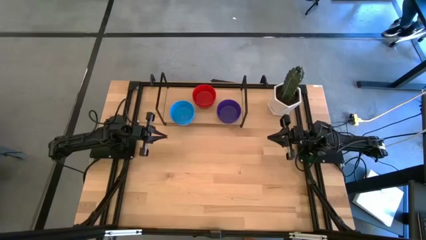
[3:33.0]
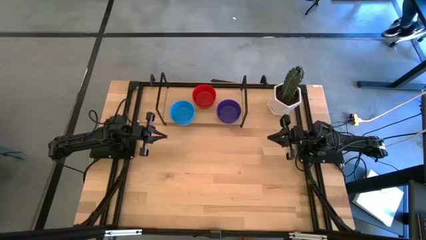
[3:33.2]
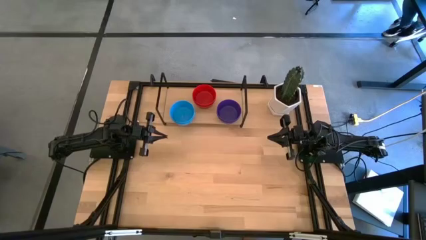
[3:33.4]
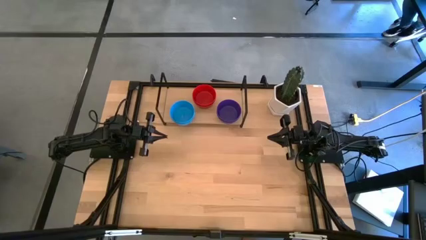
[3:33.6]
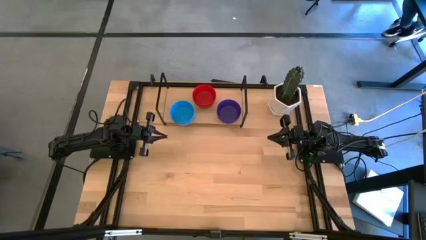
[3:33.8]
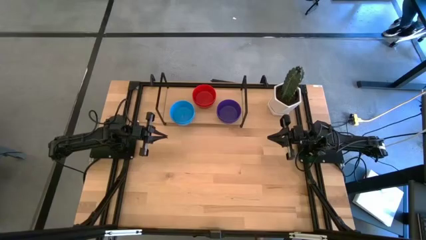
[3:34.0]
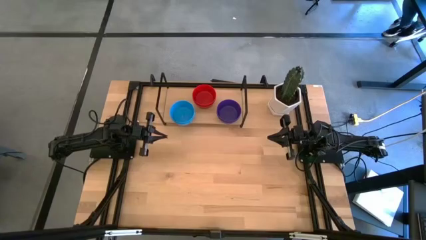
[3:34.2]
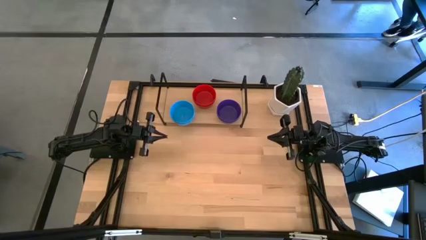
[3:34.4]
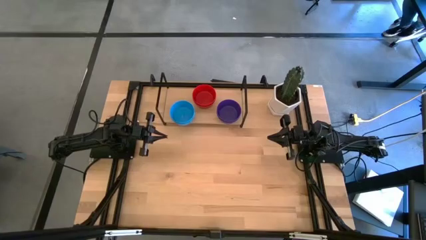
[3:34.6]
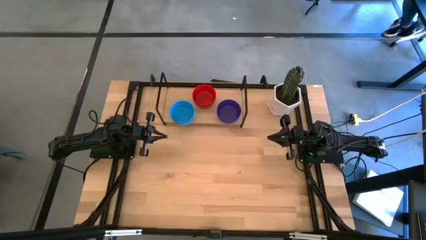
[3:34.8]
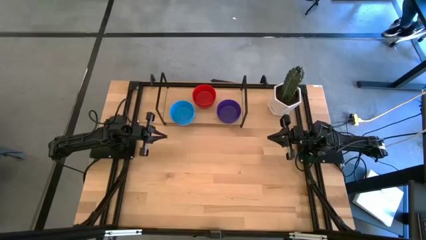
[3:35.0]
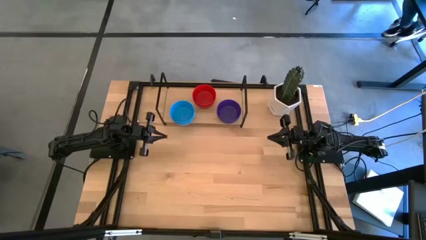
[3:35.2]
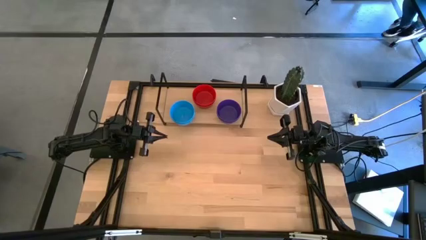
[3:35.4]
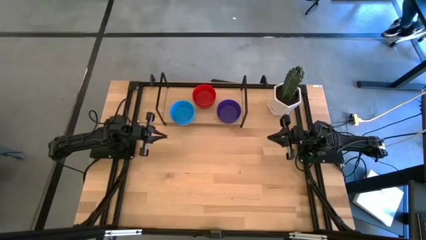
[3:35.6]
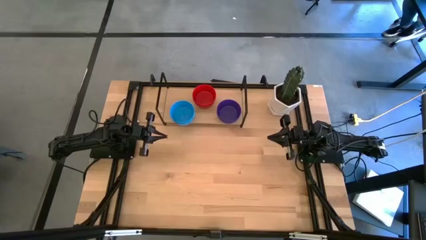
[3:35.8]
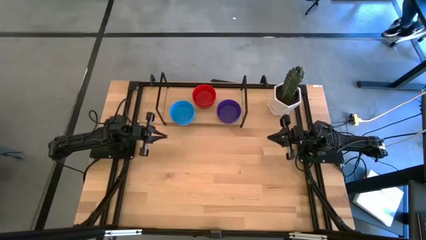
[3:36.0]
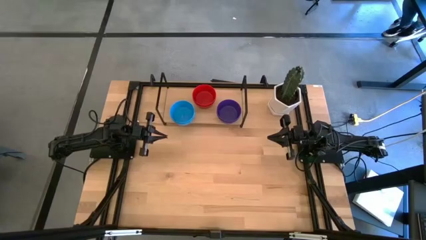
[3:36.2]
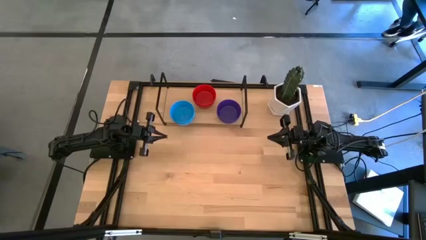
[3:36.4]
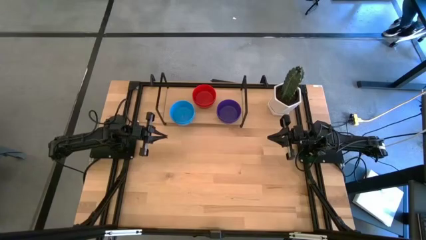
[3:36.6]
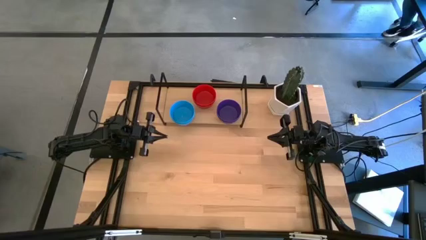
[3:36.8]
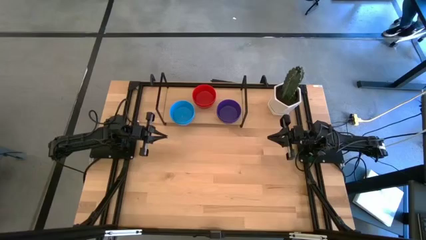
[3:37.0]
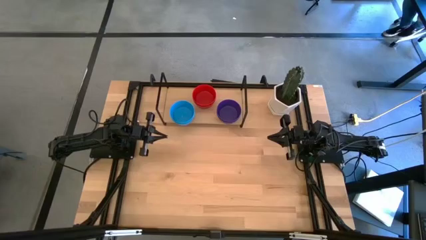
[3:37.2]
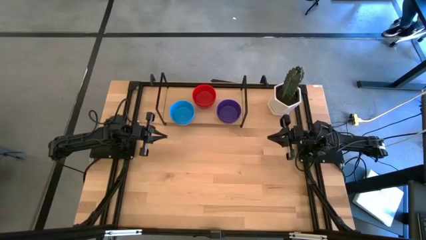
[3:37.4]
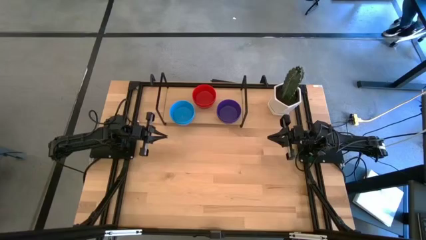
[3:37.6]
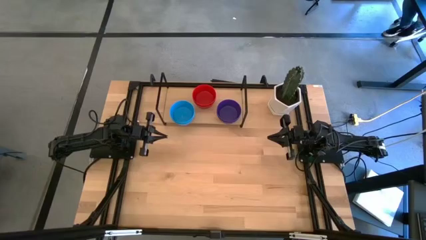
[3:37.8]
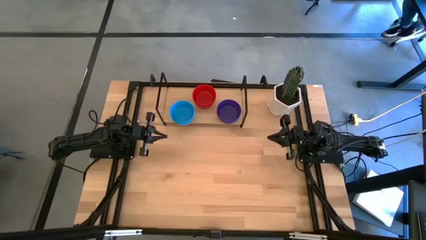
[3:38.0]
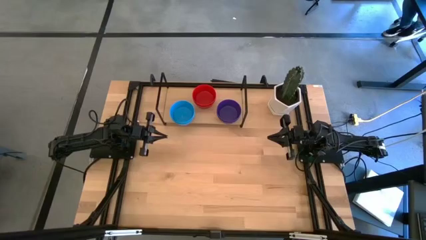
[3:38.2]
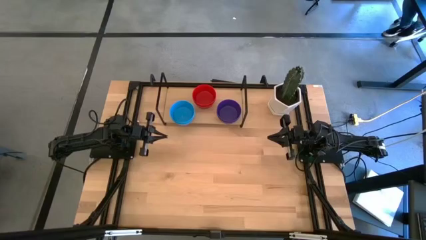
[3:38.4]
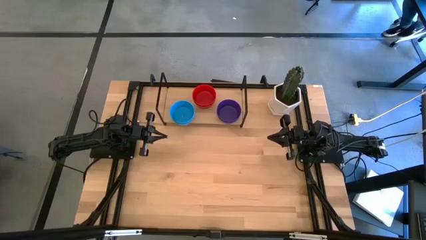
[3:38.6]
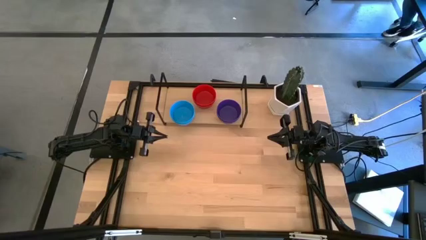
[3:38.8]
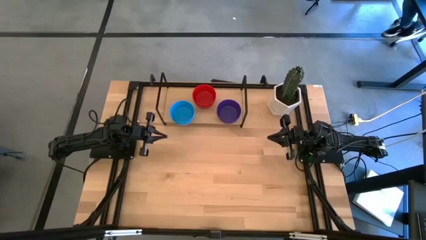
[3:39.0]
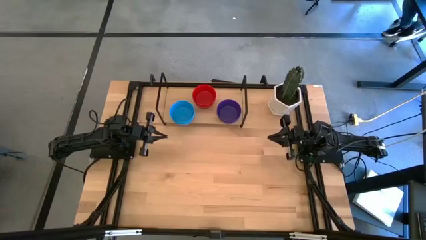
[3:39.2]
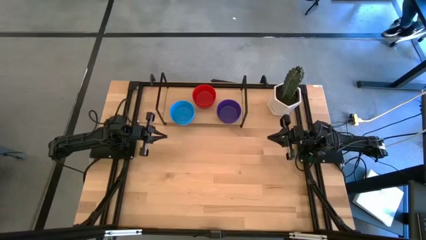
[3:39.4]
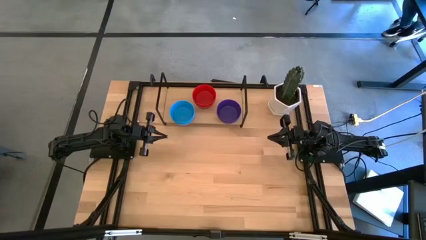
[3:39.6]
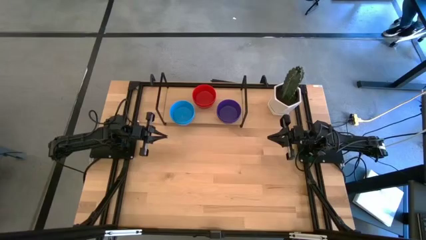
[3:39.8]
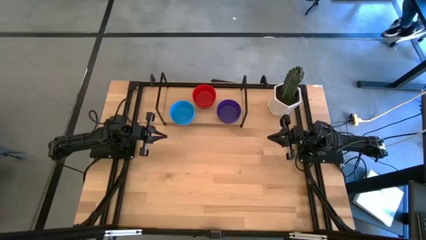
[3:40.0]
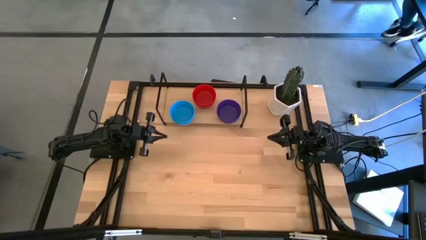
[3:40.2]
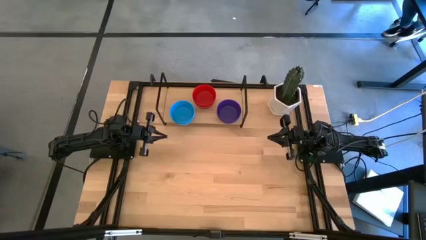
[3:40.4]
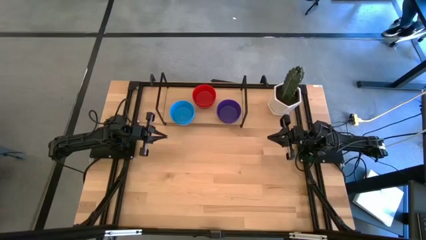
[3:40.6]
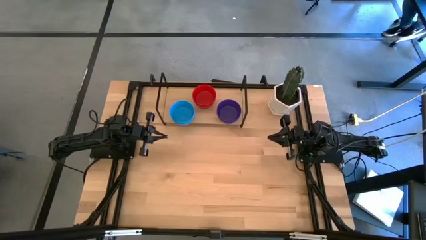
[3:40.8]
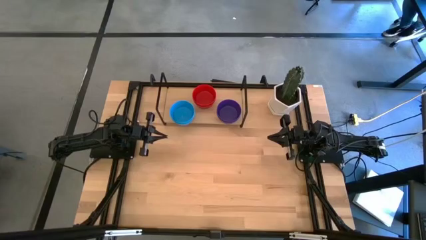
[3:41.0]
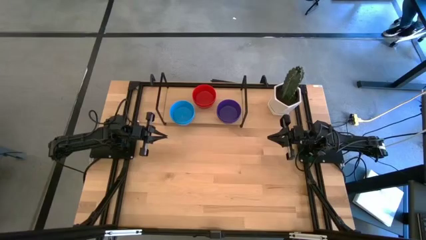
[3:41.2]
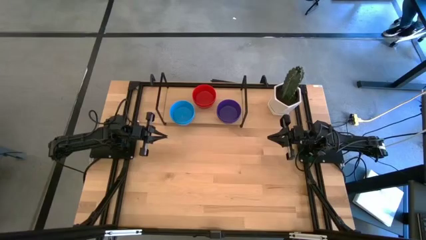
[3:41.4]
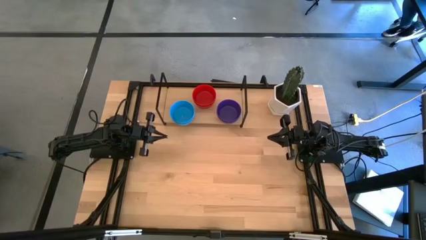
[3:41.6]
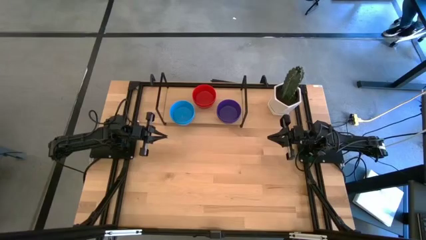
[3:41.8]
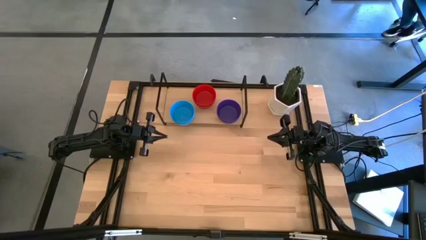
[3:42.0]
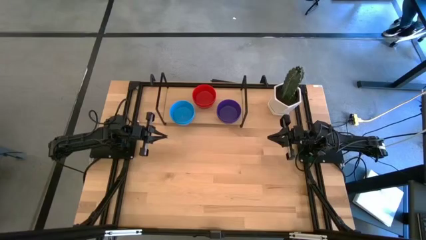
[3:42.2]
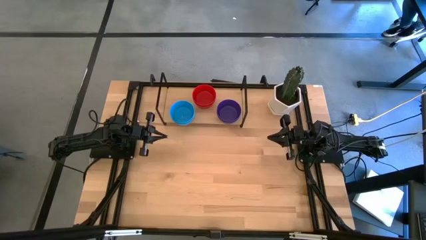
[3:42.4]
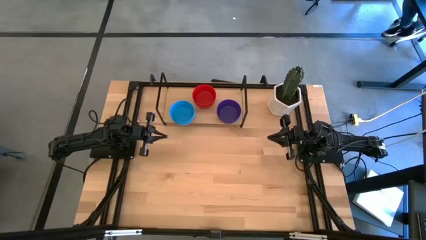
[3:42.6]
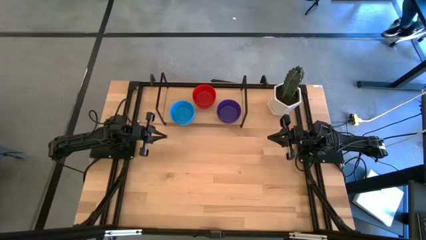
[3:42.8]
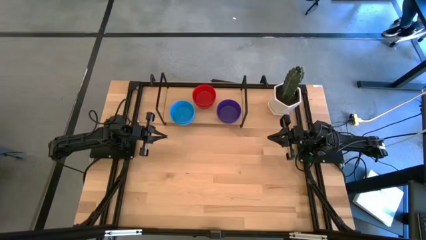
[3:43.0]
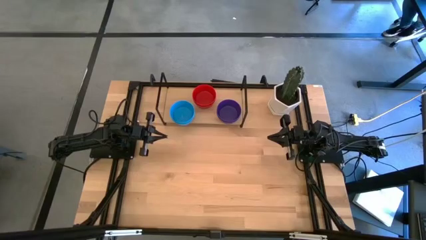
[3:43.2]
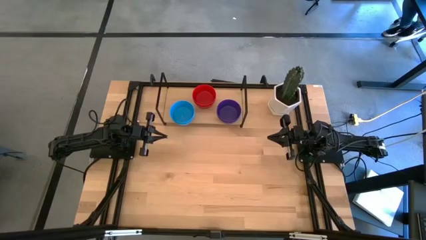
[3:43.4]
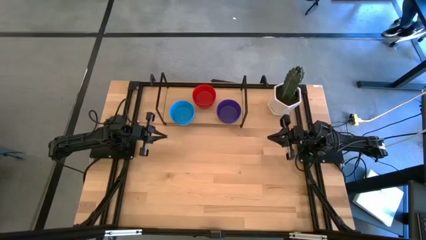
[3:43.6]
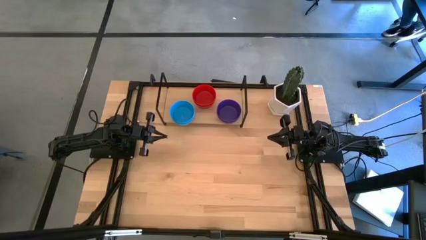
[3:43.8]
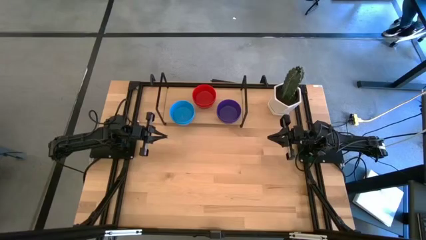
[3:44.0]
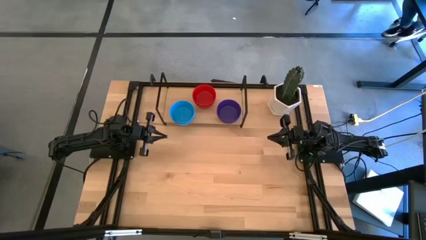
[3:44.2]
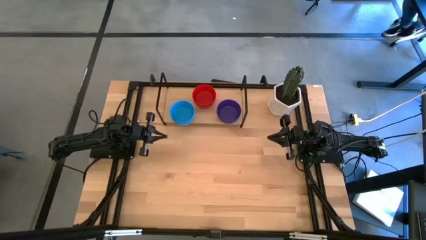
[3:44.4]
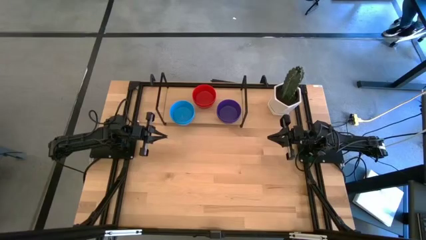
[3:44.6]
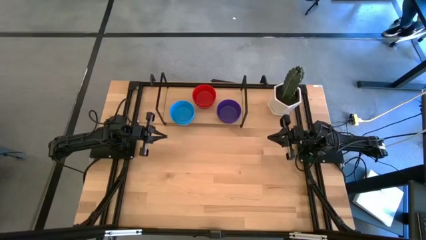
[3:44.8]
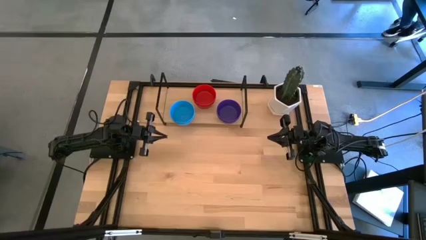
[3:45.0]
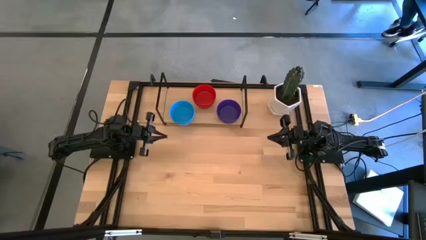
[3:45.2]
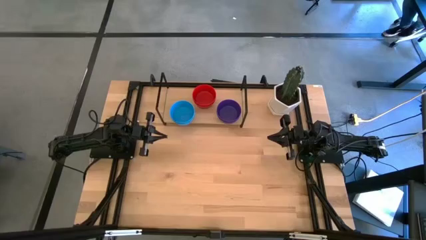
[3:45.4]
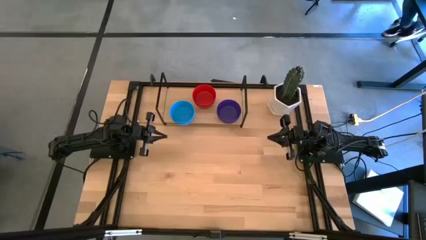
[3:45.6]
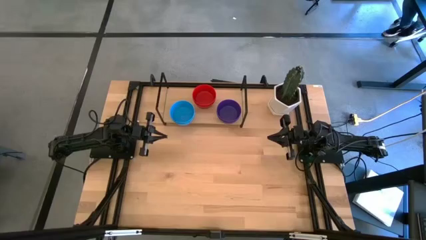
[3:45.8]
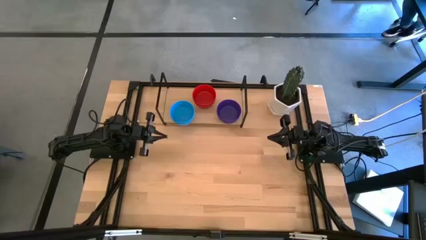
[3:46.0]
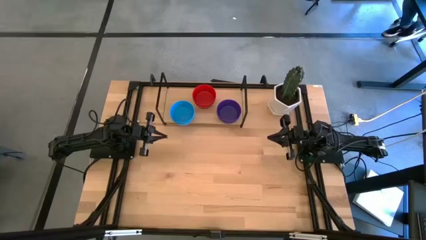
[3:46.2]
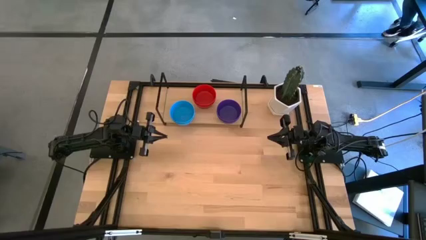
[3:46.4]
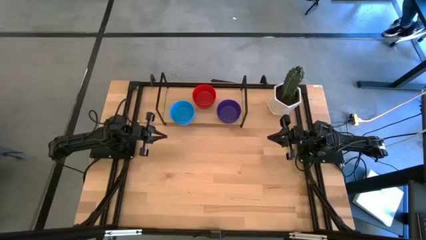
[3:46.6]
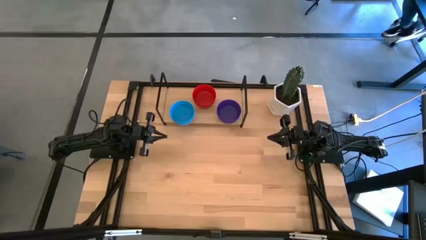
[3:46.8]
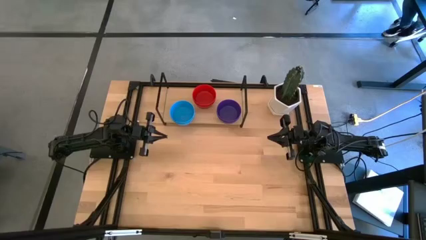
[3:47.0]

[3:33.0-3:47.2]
Task: Pick & Place Mini bowls
Return to Home Position

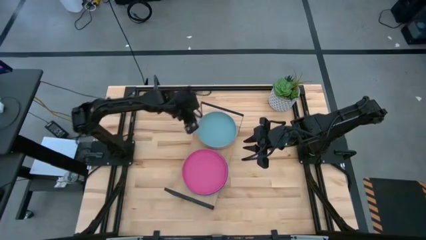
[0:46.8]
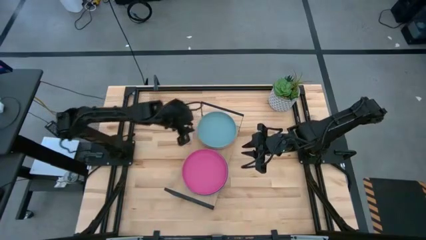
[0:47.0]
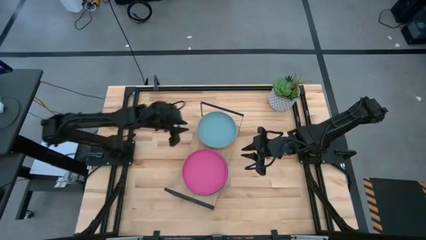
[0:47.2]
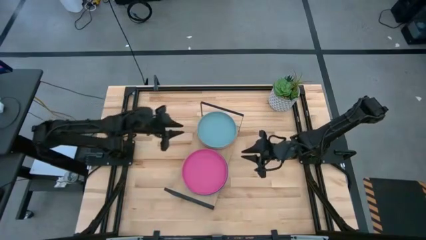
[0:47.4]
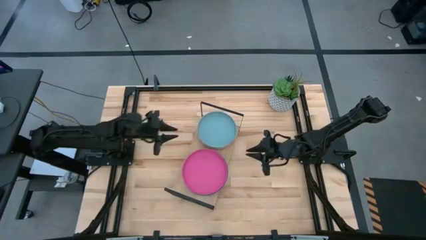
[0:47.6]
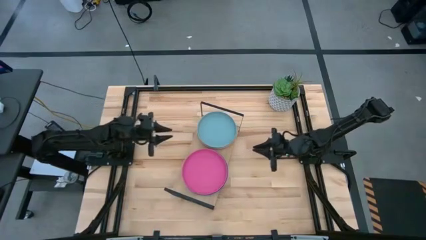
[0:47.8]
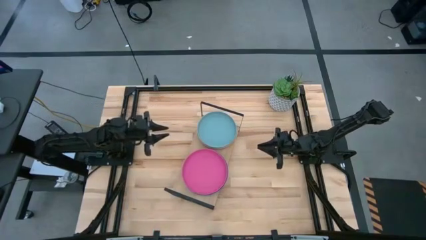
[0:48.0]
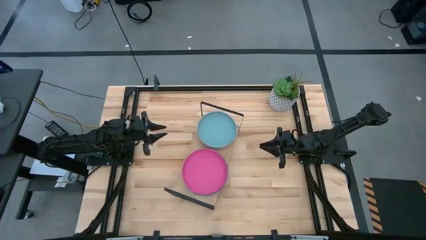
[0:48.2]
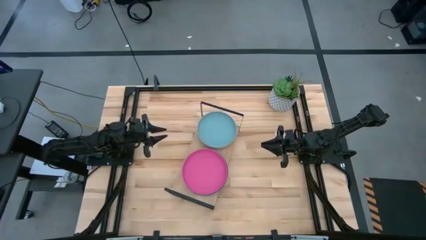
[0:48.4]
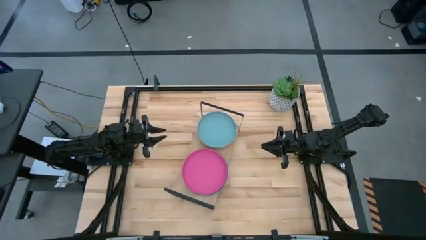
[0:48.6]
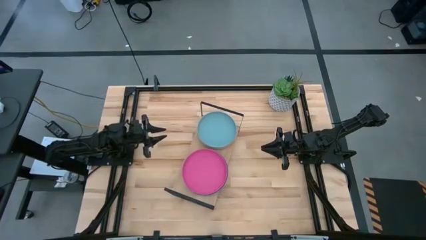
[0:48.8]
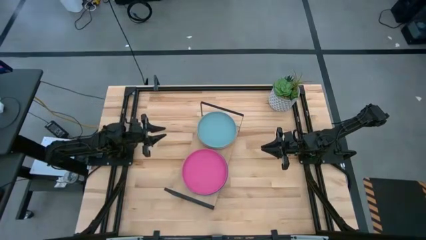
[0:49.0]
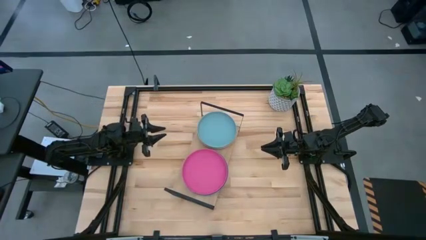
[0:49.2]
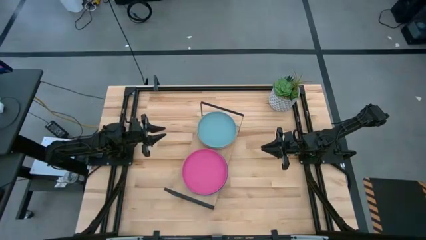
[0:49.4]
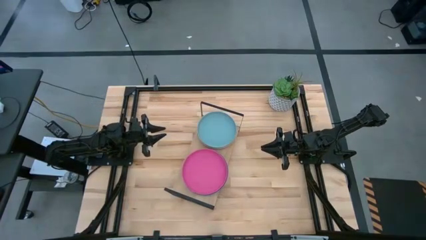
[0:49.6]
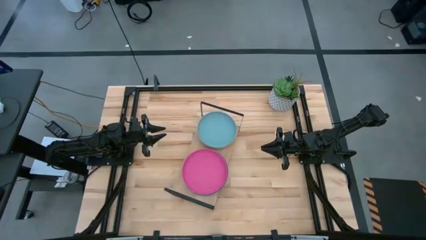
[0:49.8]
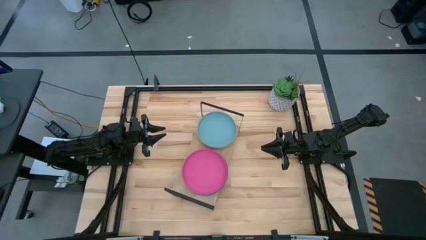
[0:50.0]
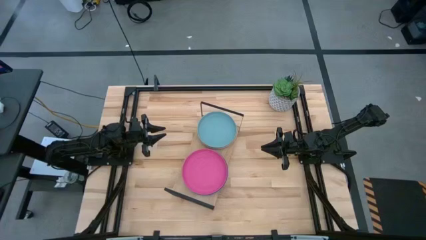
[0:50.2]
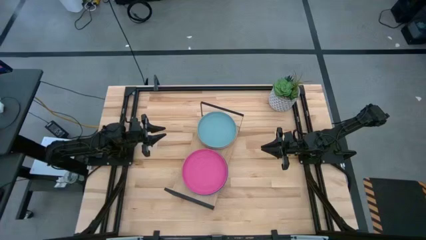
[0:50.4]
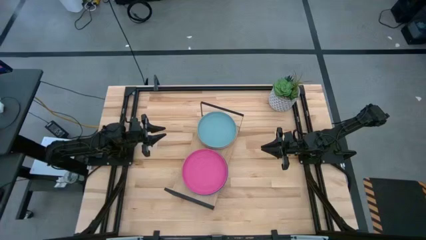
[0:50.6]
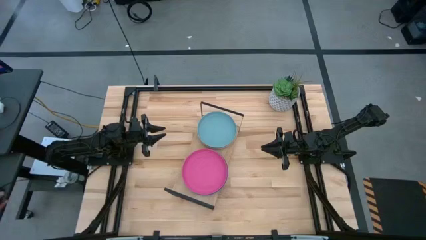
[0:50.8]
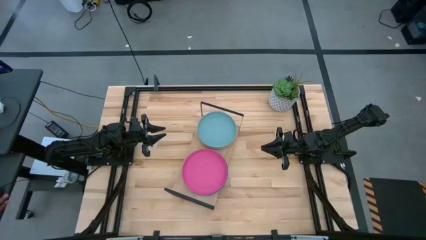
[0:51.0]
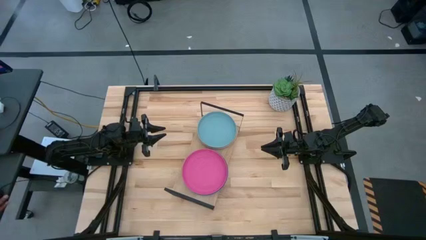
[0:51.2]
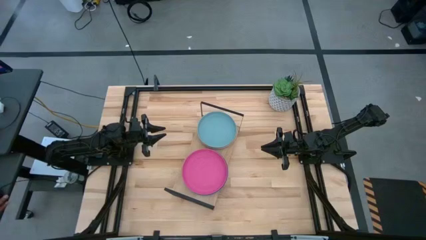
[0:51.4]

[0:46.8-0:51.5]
Task: Place and stack plates onto a shelf
Return to Home Position
